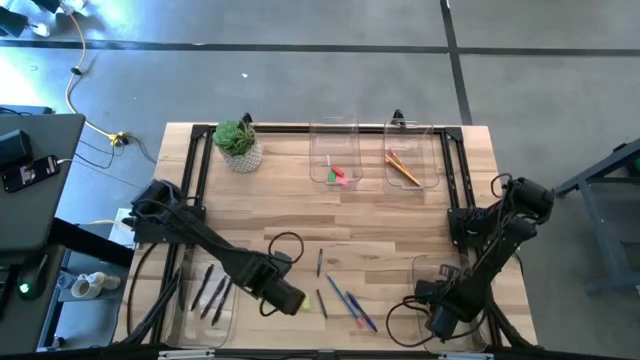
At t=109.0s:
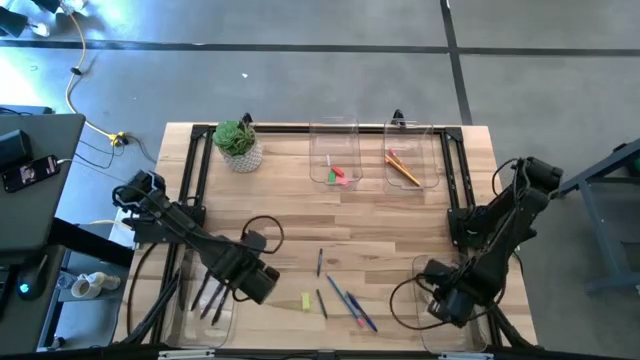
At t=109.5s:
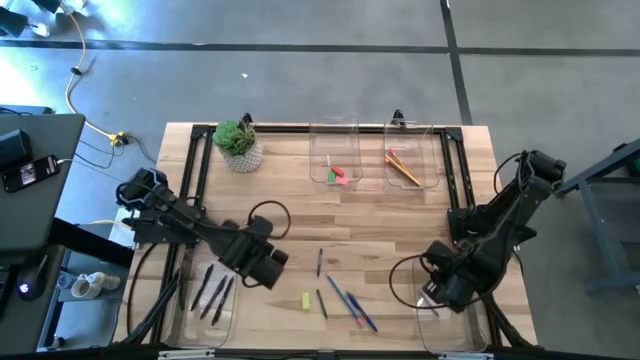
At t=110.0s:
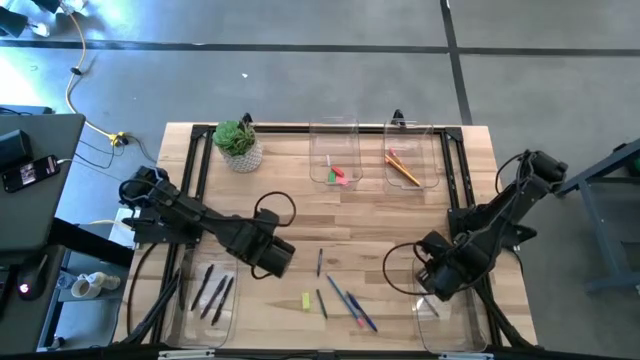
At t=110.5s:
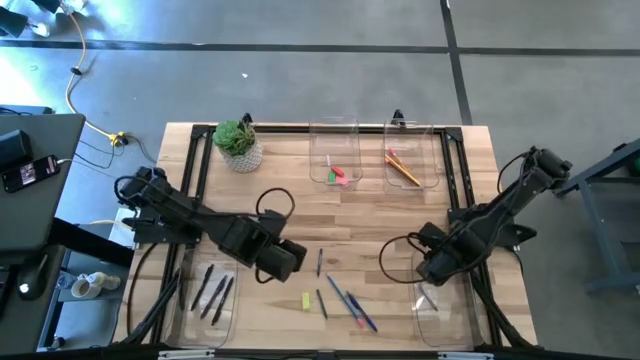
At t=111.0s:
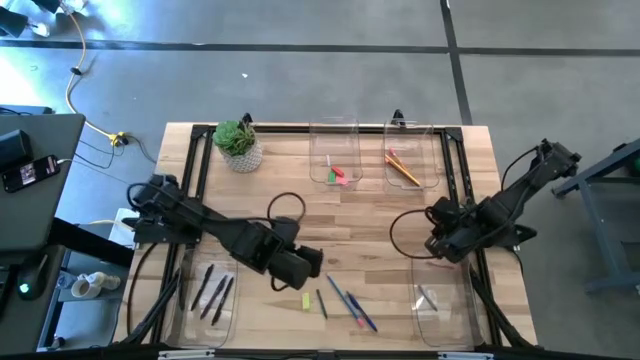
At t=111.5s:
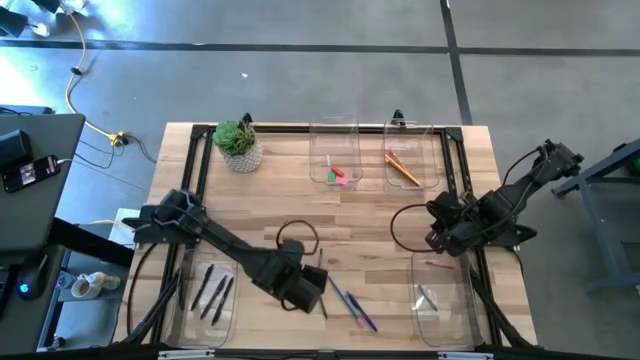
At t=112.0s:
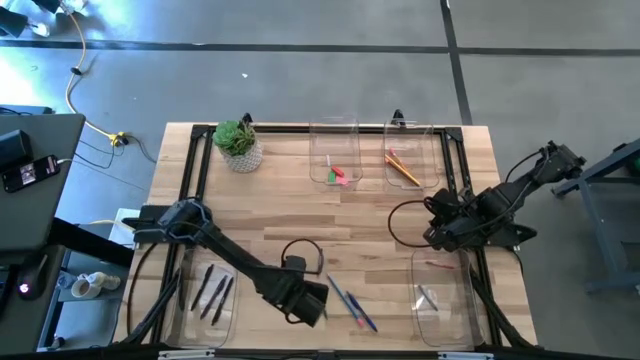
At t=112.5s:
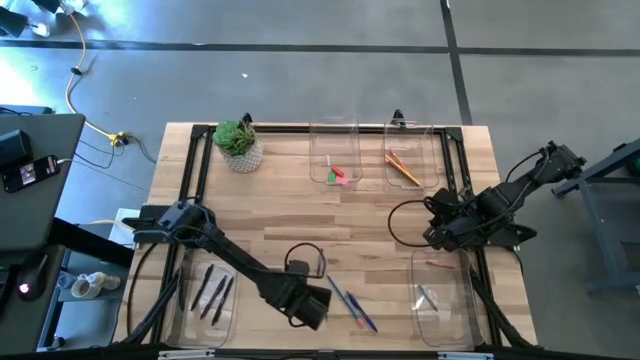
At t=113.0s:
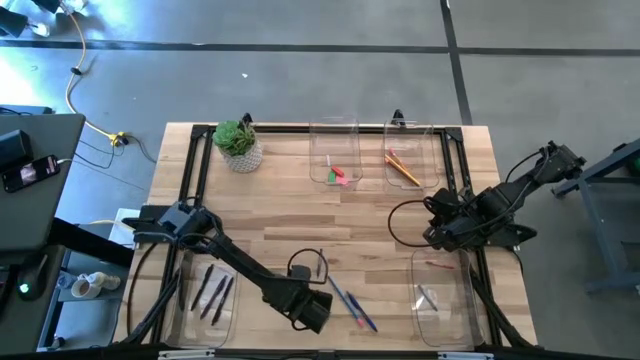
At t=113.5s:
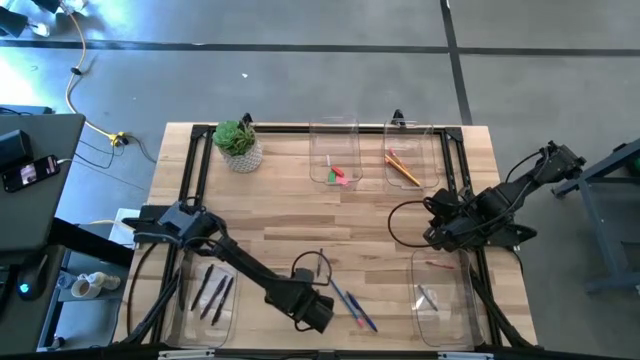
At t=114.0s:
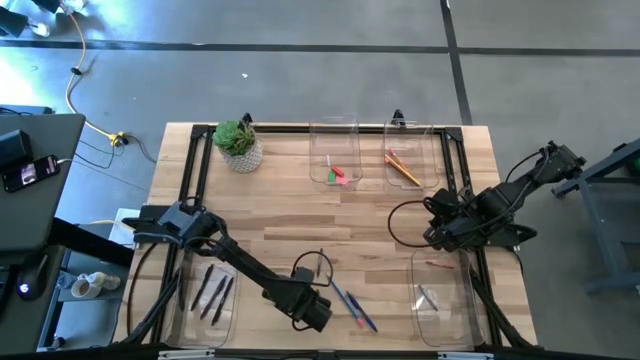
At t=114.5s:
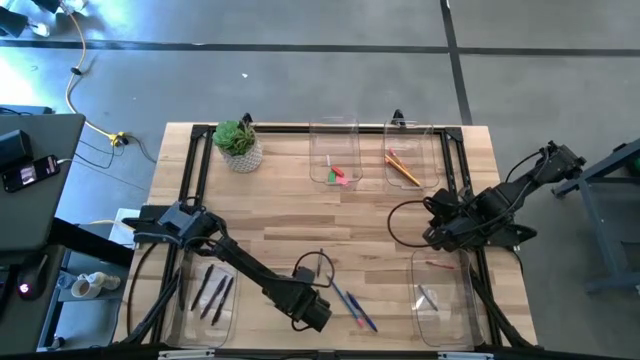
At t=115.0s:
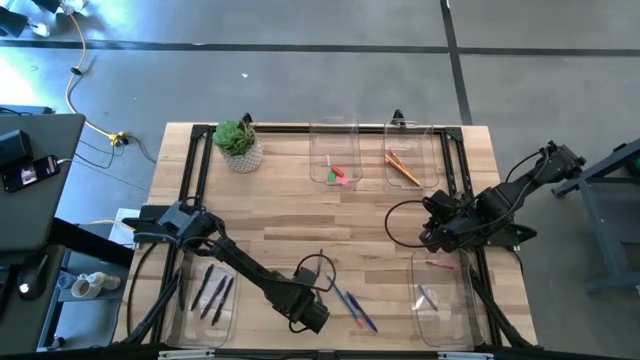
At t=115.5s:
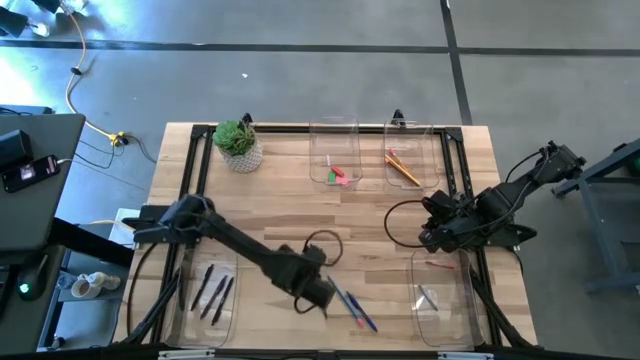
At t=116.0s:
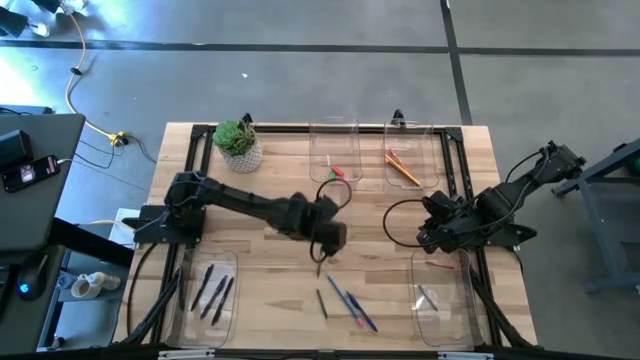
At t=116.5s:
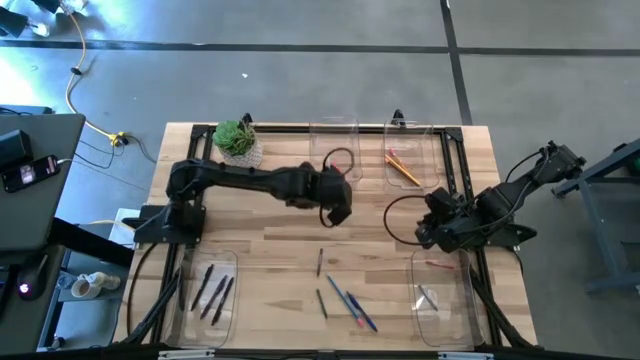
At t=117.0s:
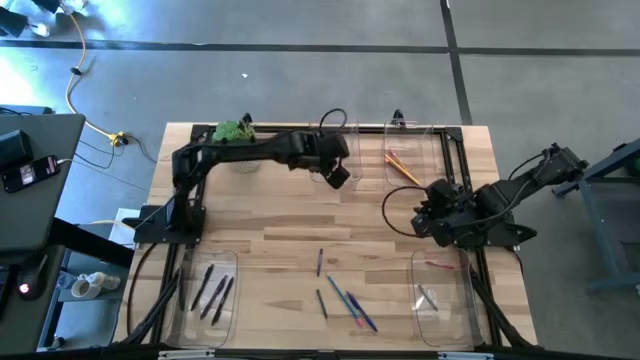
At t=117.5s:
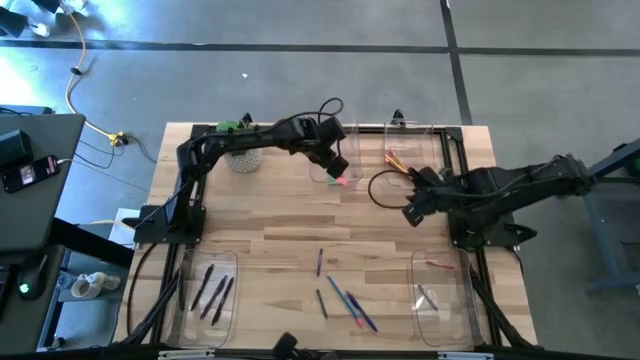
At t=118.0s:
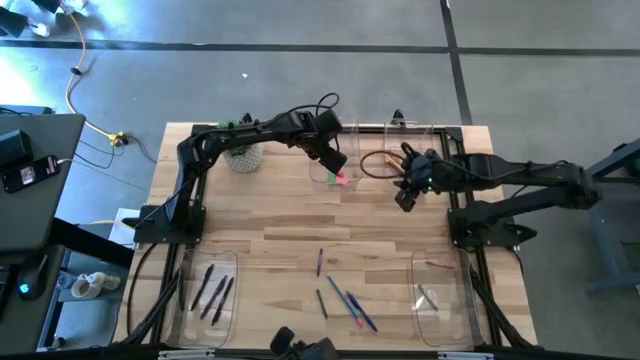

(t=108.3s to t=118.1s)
Task: Sort crayons/erasers/pens/pencils in bins
Put the light green eraser into the top right transparent bin

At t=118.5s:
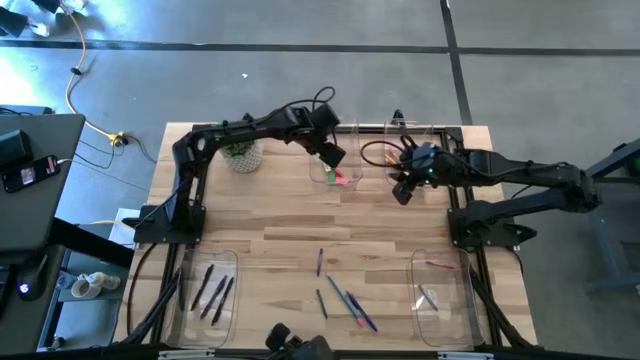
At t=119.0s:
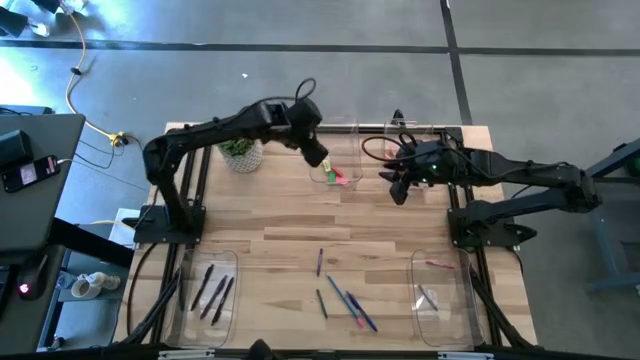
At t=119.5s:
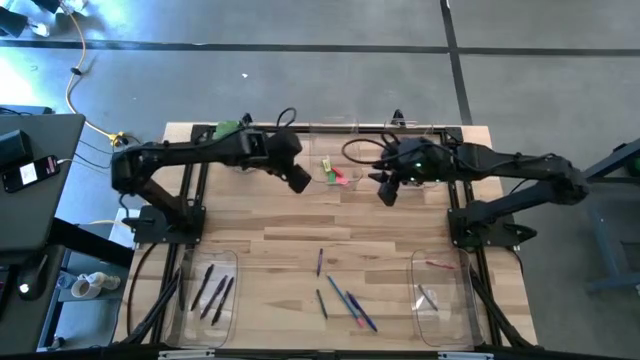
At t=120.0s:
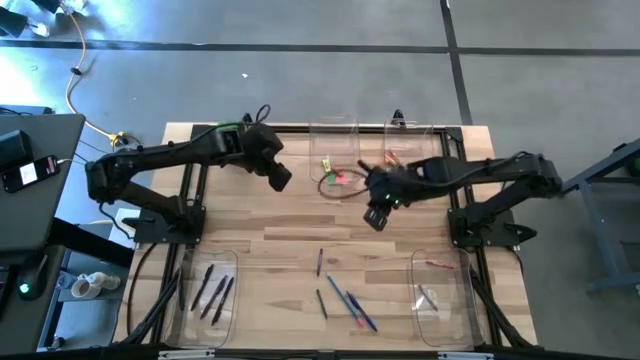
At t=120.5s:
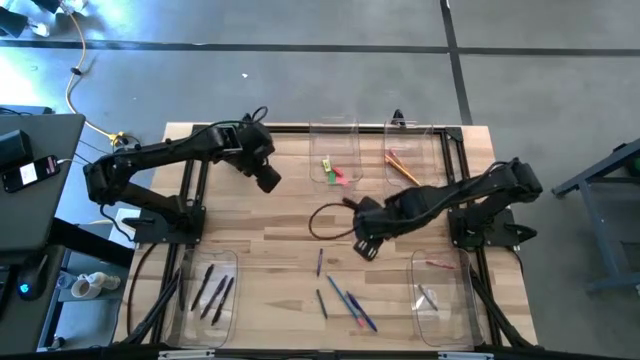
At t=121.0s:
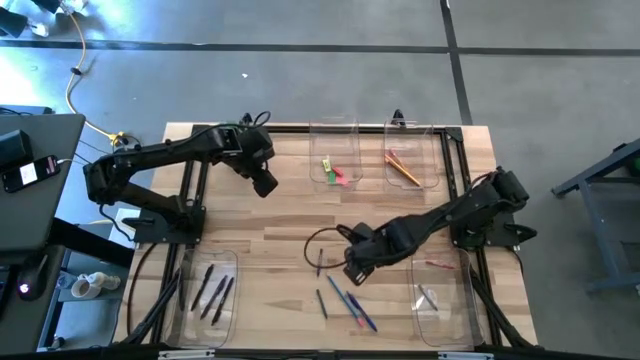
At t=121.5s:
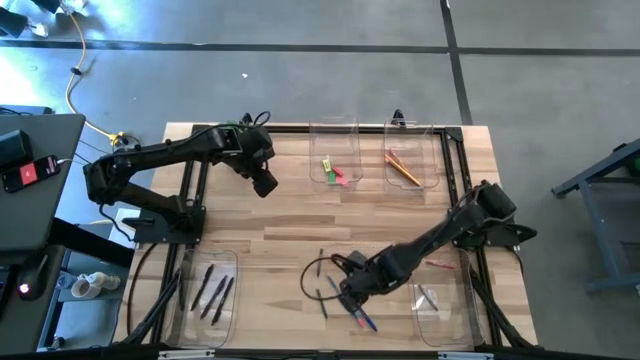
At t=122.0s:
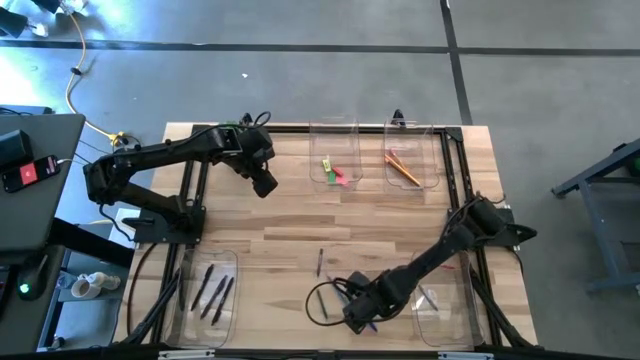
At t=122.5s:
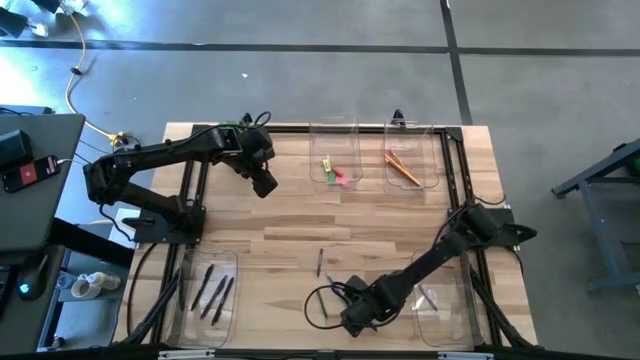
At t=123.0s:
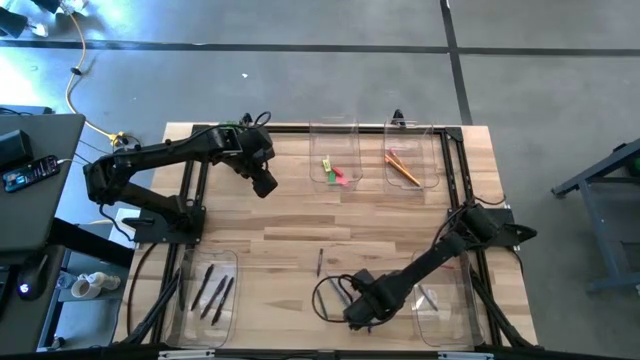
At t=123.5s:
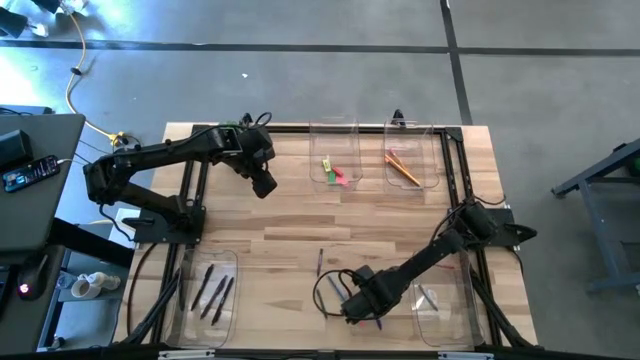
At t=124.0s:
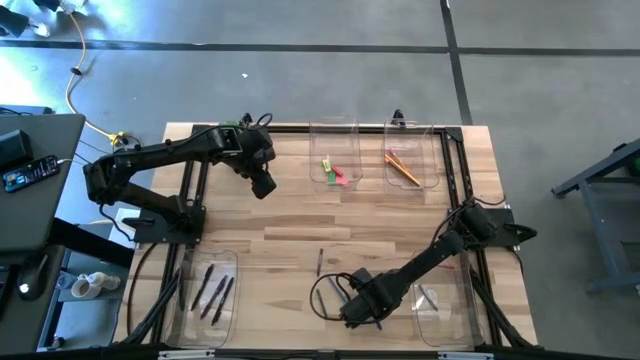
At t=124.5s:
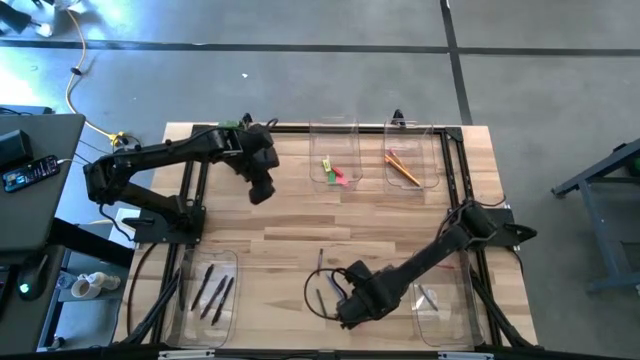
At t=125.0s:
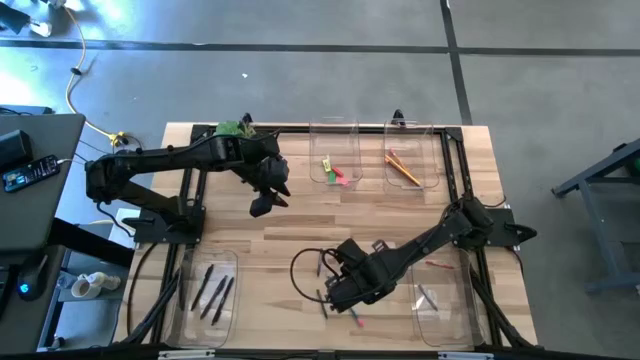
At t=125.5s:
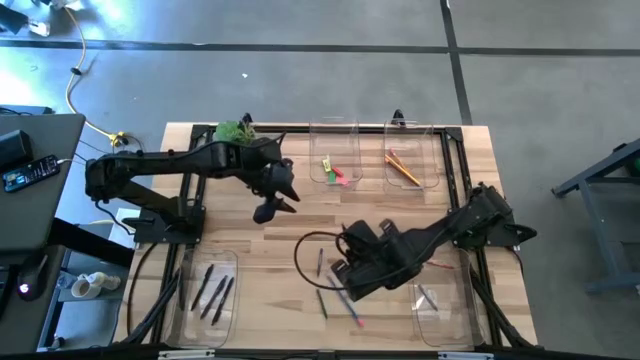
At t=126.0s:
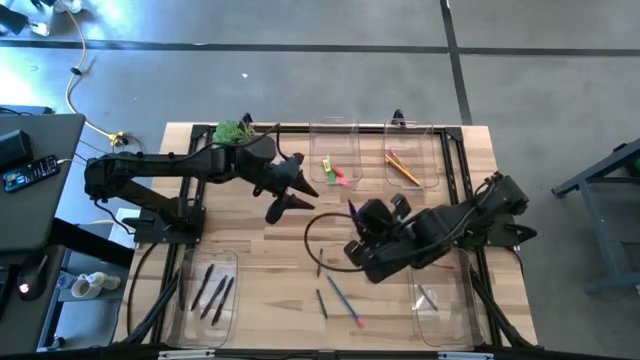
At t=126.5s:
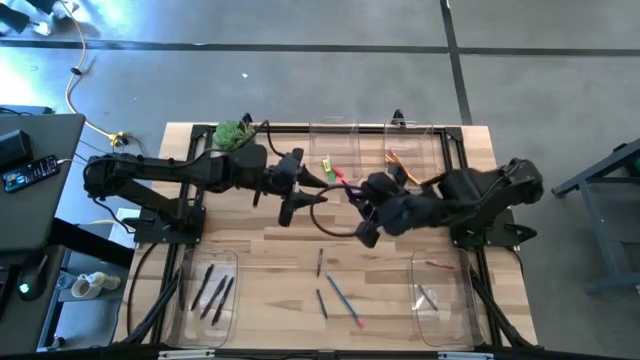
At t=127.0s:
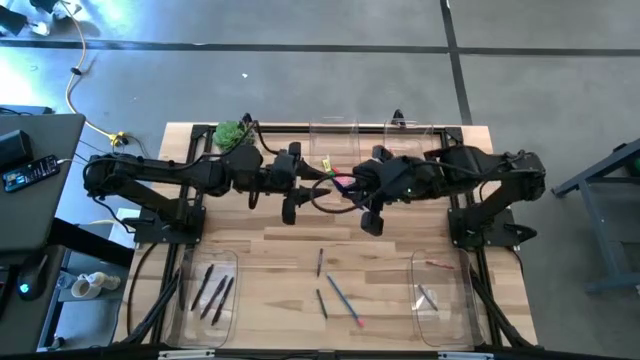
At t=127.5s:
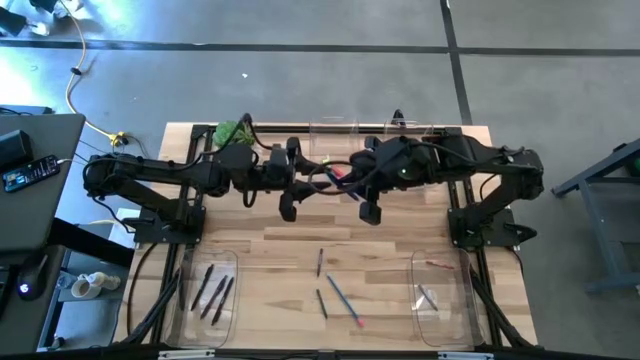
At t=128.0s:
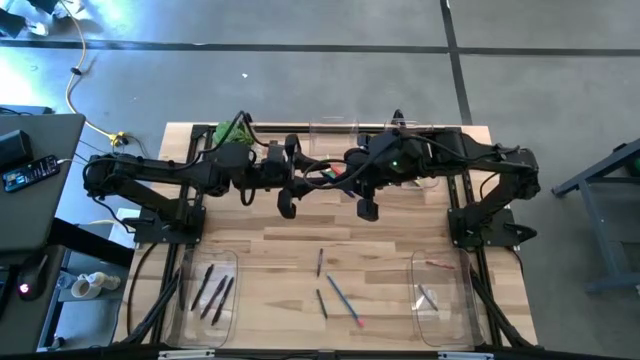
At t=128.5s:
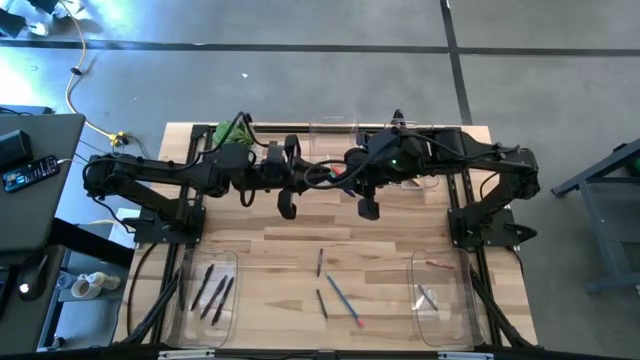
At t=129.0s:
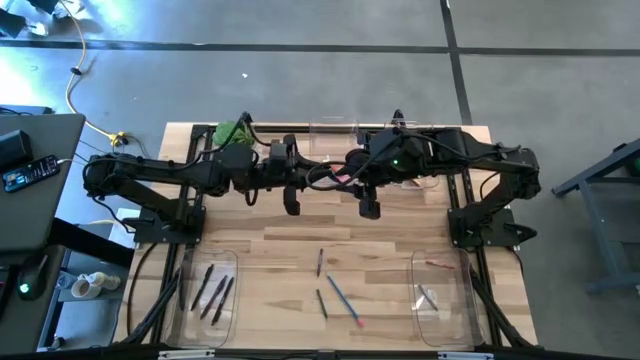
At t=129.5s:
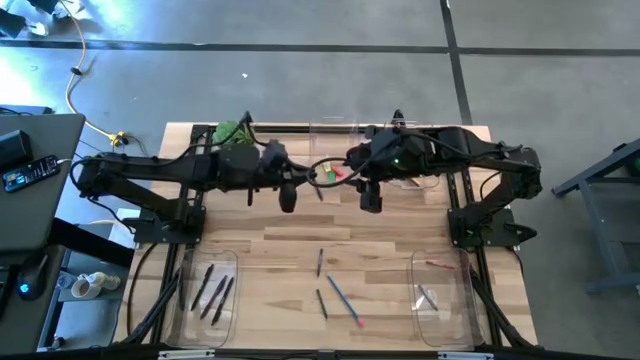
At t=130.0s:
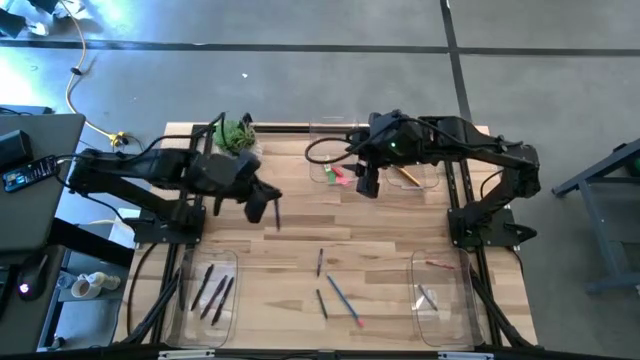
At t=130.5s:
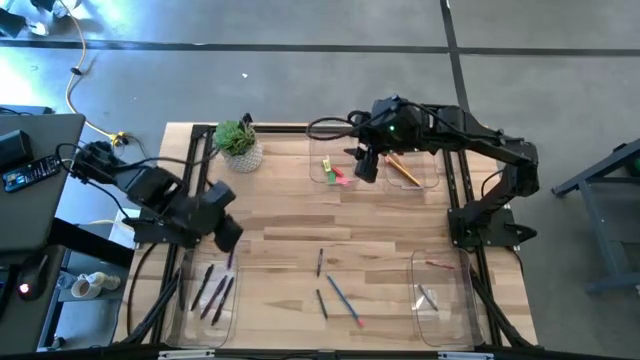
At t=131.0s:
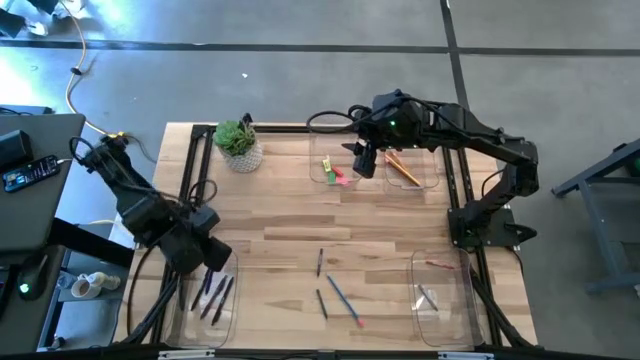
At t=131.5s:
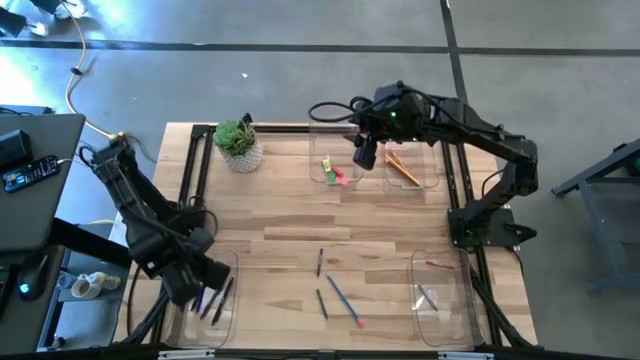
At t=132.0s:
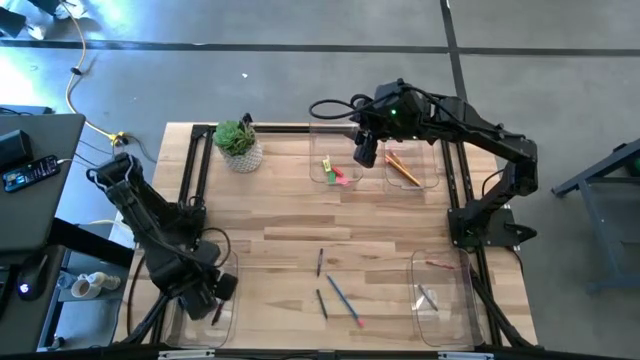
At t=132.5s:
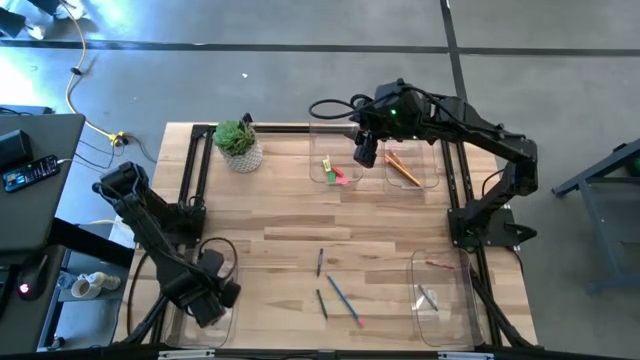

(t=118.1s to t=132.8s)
Put the blue pen into the bottom left transparent bin
